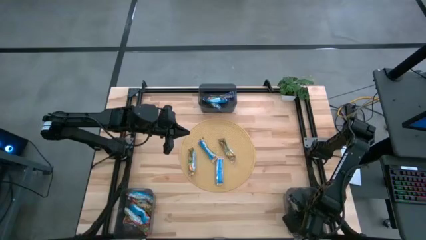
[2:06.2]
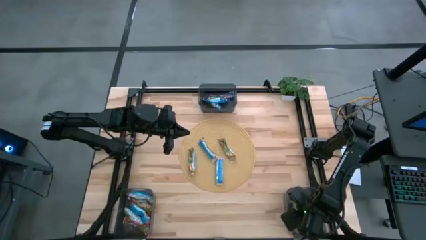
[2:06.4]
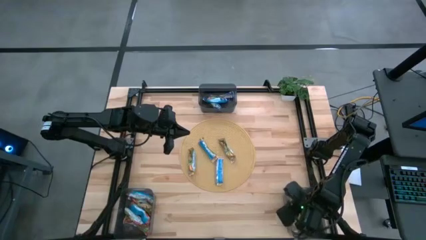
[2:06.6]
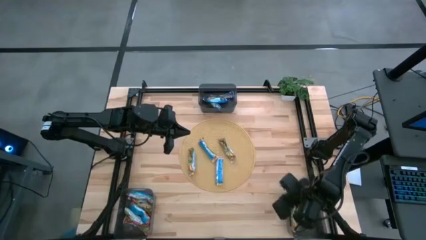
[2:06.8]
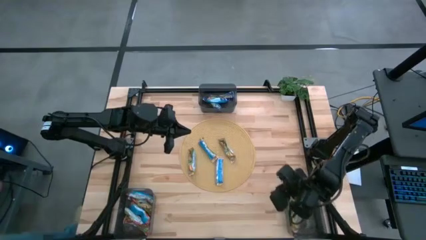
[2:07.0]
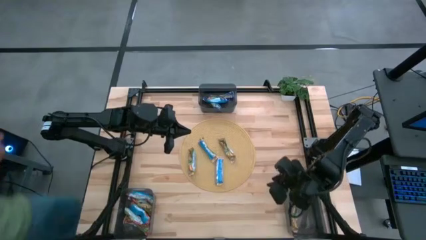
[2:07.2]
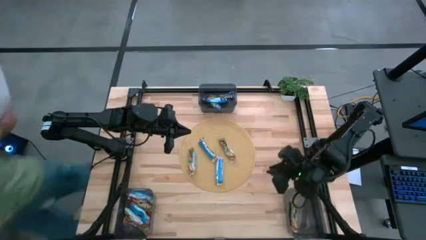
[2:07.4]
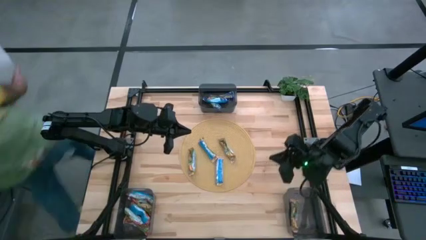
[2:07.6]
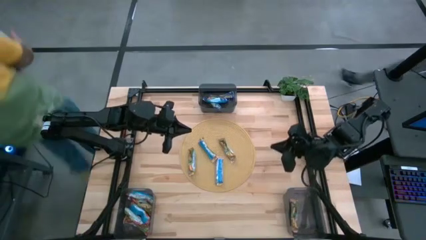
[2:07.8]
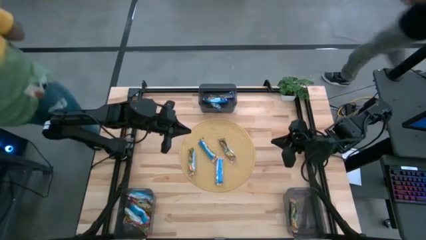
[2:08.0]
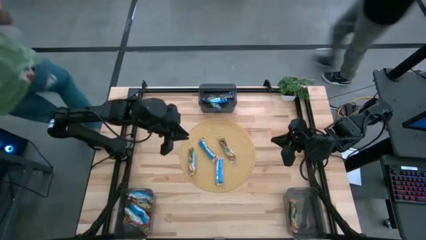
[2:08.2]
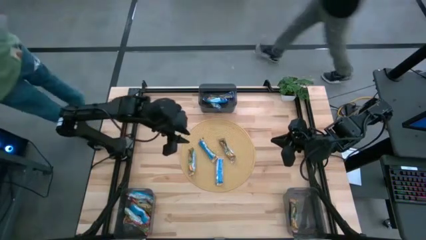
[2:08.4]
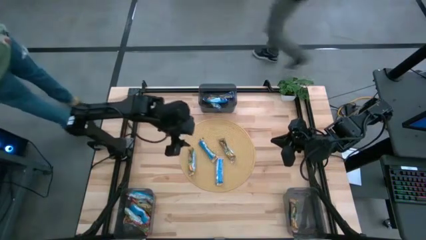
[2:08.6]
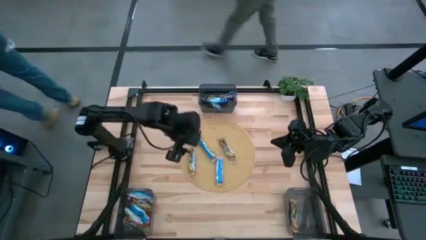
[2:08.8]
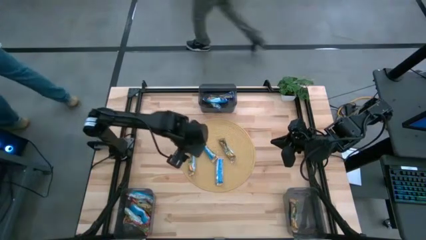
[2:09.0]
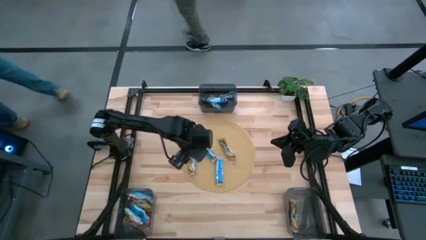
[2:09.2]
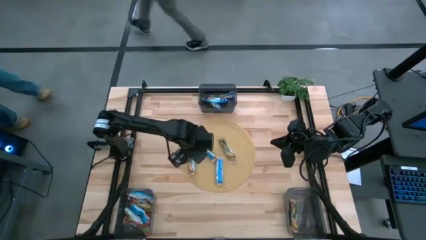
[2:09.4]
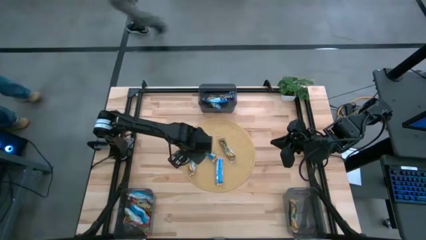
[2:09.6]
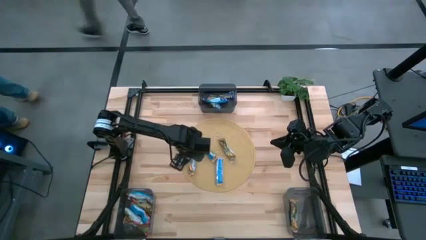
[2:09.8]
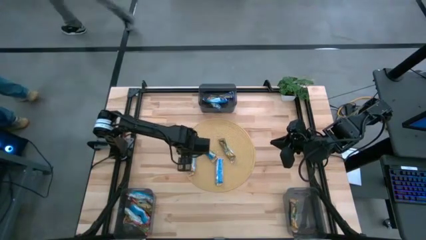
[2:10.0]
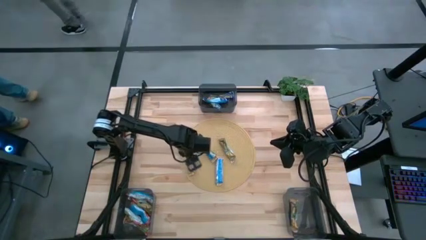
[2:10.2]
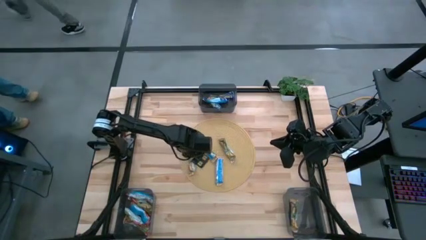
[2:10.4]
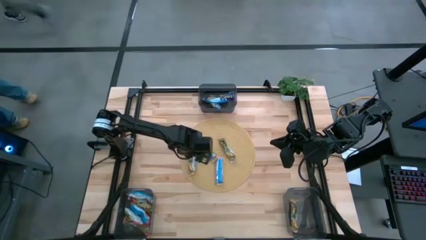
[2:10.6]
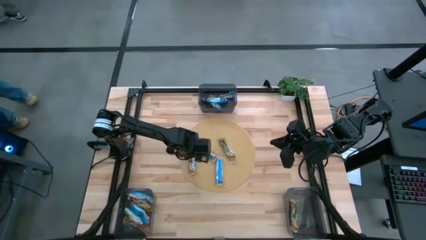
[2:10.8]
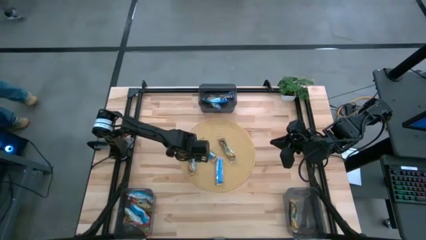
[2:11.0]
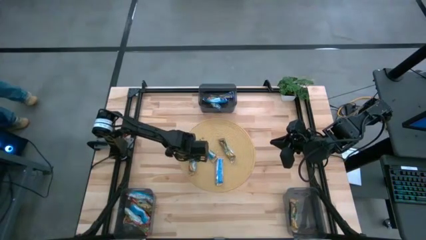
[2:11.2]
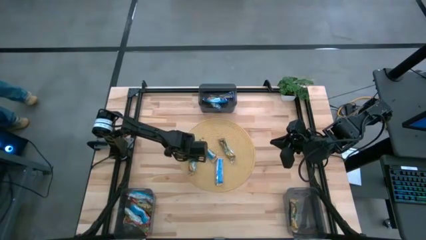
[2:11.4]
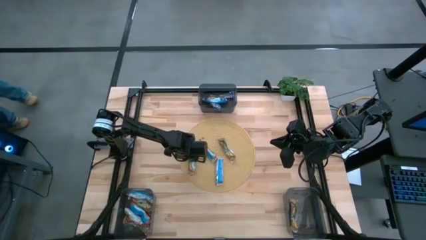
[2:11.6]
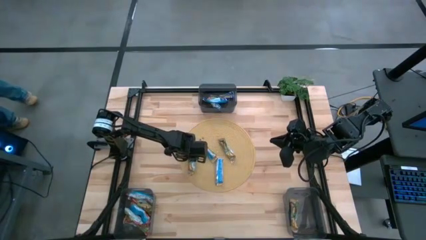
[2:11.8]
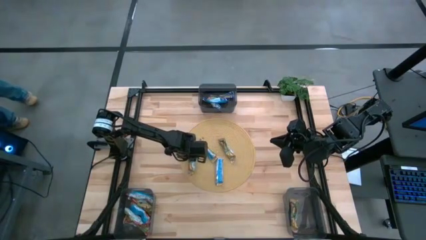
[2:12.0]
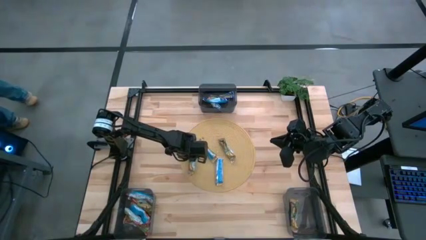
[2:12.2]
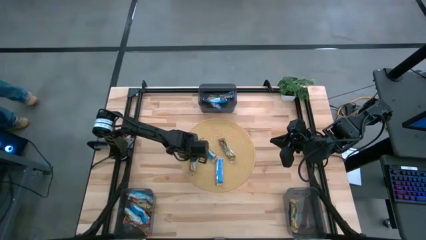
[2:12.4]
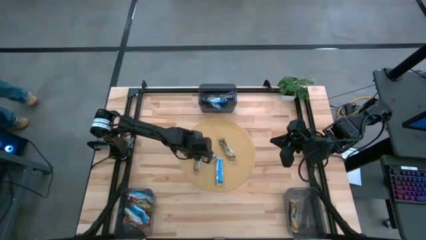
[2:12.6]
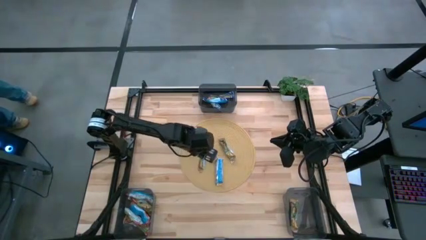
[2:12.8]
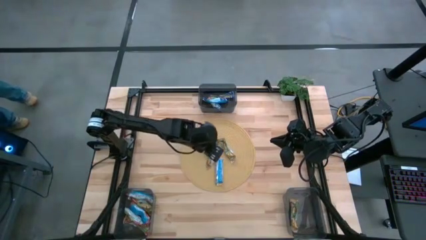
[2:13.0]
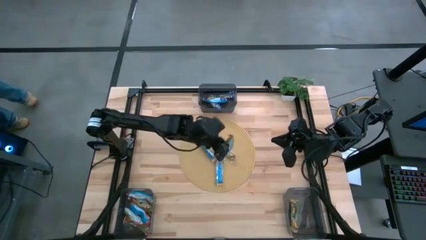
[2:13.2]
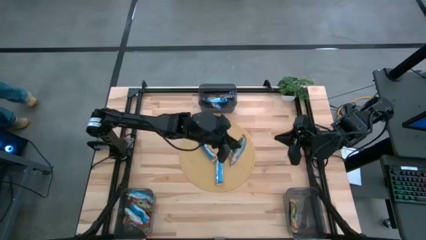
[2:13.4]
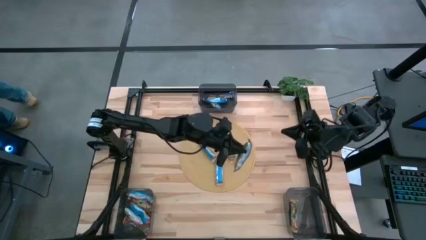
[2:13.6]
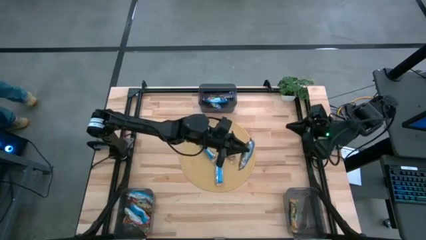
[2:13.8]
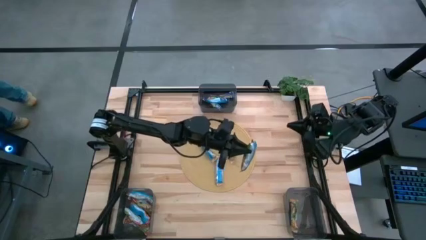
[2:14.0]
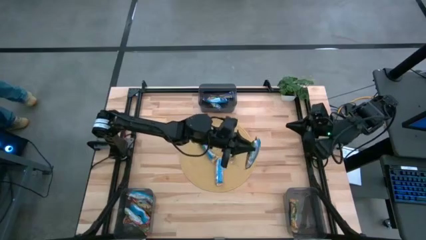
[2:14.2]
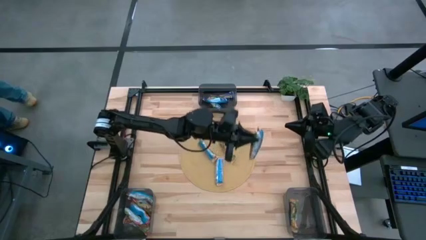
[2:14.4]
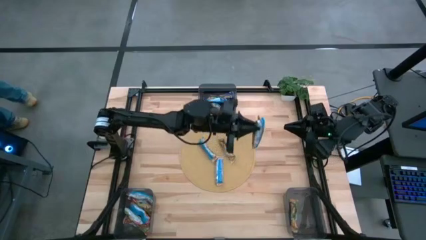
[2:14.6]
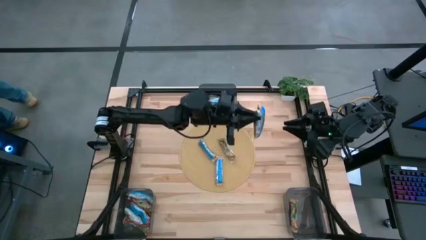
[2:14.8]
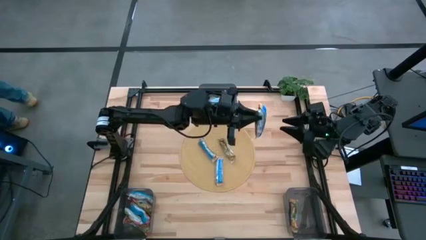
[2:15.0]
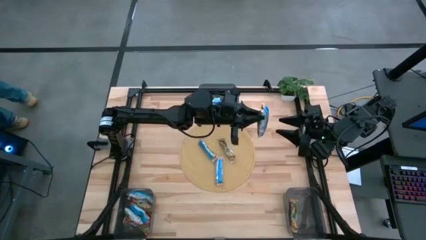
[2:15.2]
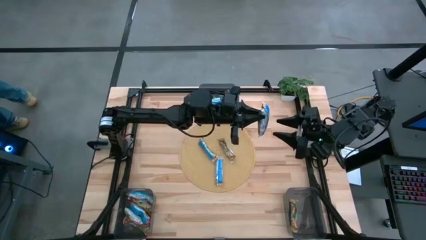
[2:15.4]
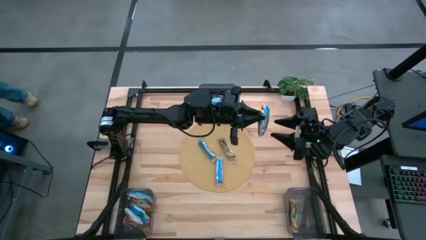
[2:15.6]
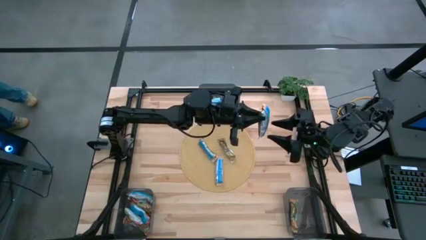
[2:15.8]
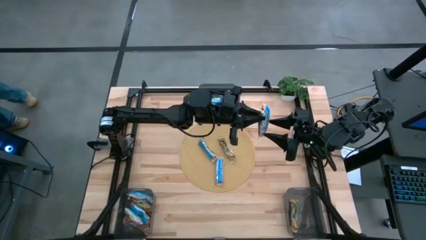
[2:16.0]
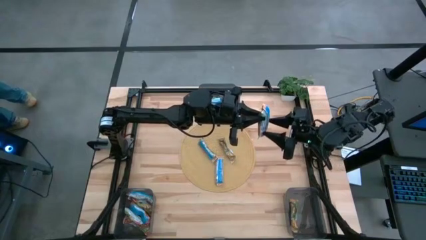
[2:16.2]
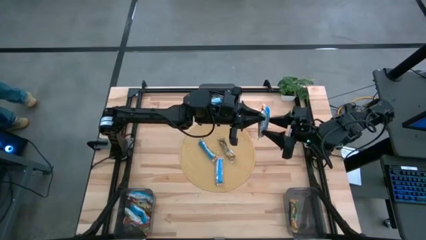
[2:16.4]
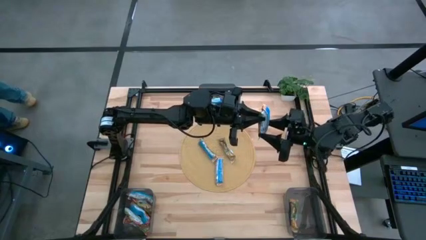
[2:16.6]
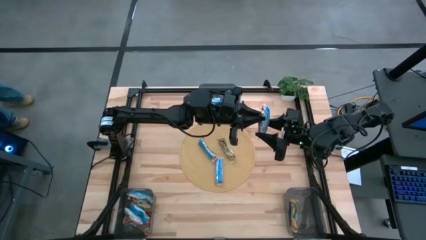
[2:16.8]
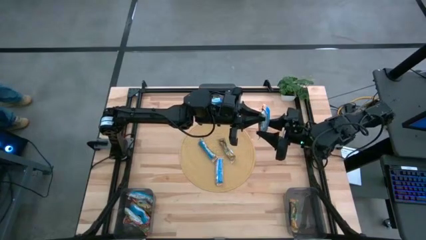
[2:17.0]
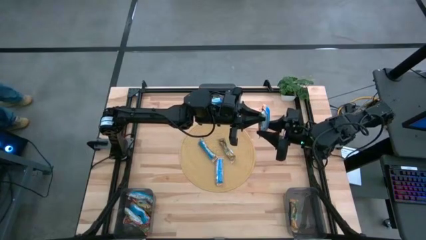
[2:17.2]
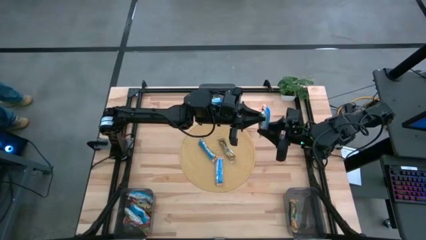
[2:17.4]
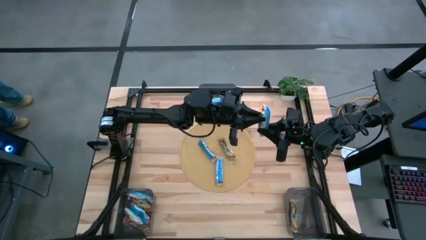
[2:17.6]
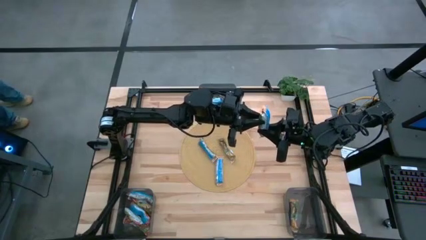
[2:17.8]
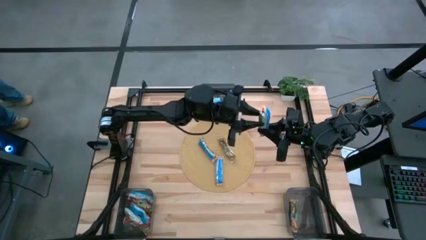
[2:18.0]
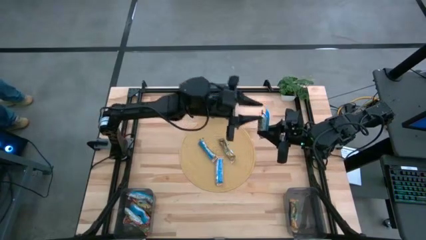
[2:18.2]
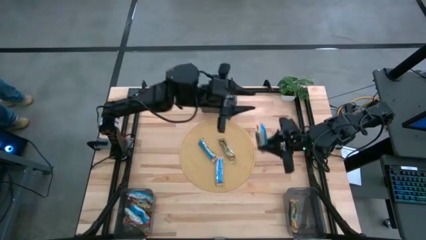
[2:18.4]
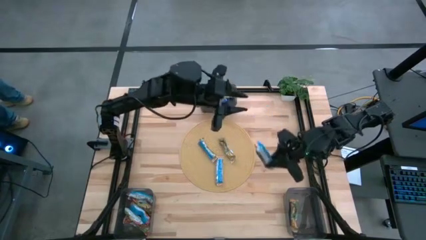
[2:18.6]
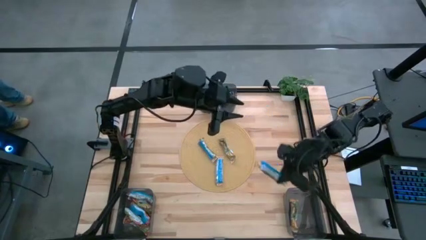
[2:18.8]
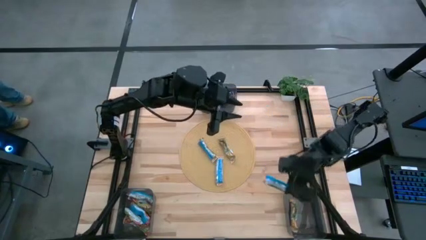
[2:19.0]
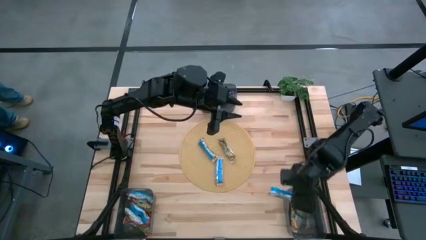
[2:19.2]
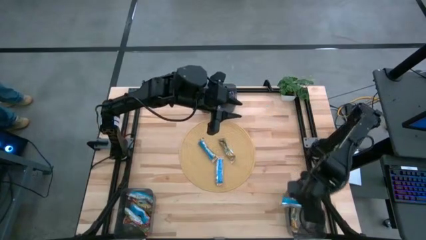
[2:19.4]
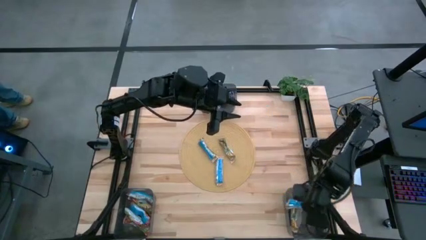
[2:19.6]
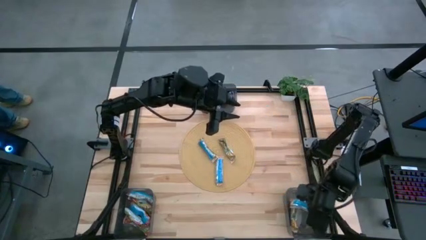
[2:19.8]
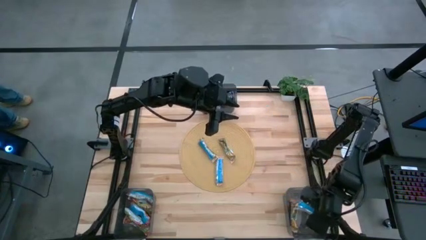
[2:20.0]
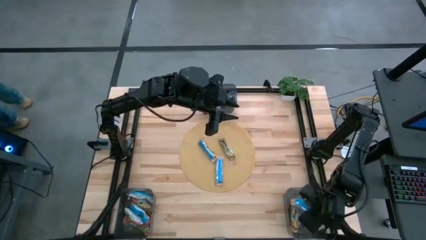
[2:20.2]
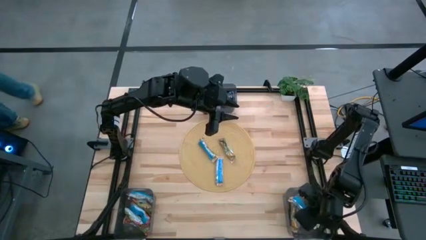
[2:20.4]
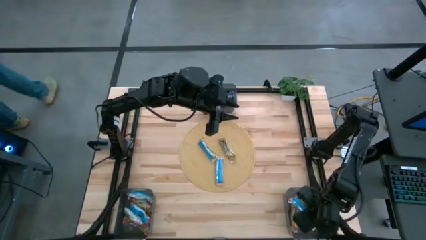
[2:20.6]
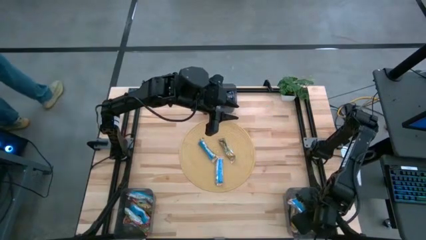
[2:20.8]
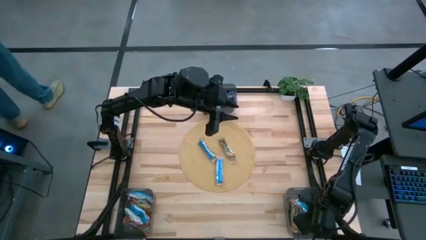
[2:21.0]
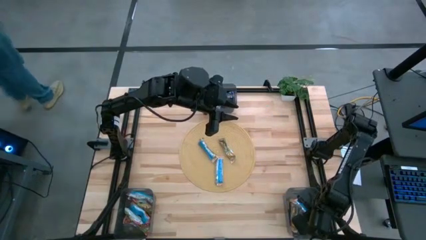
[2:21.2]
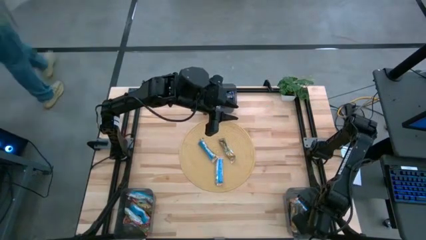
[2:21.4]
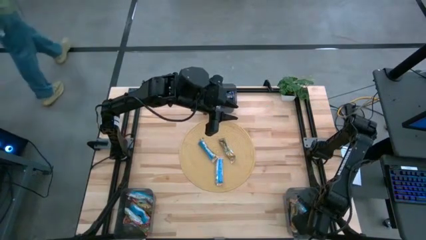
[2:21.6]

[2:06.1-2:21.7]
Task: Pick and place Granola Bars by type
Put the yellow granola bar into the right black bin

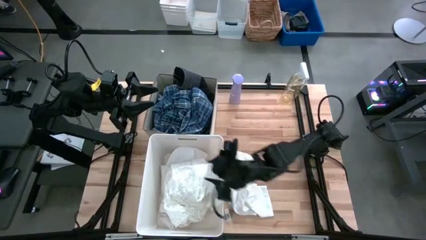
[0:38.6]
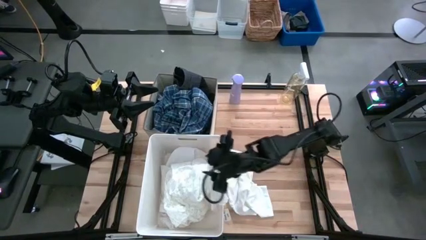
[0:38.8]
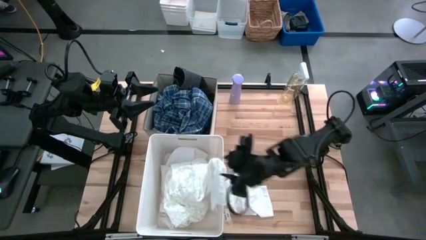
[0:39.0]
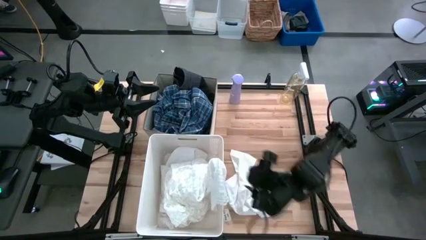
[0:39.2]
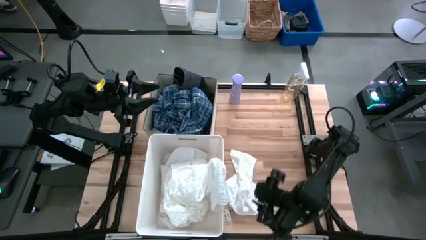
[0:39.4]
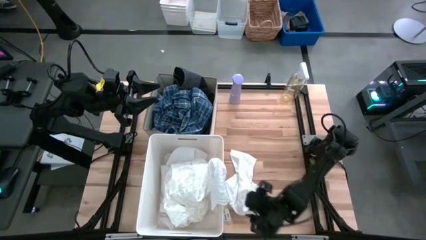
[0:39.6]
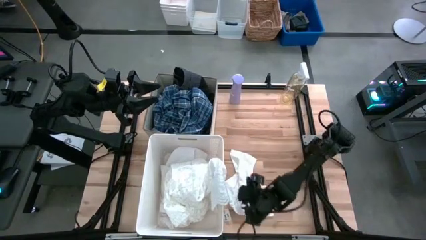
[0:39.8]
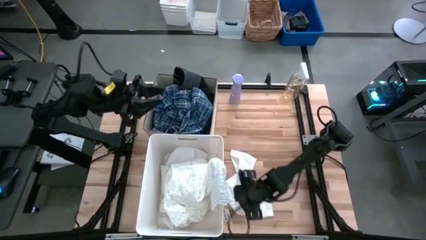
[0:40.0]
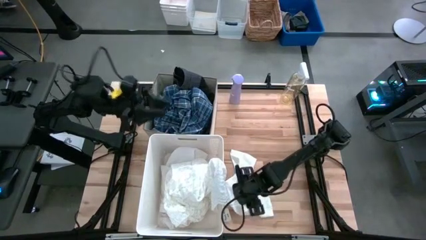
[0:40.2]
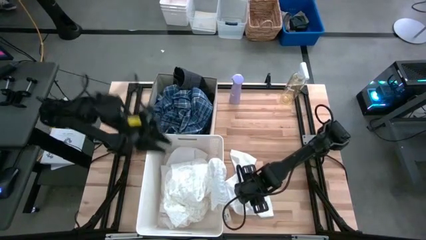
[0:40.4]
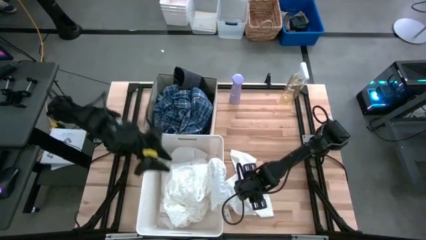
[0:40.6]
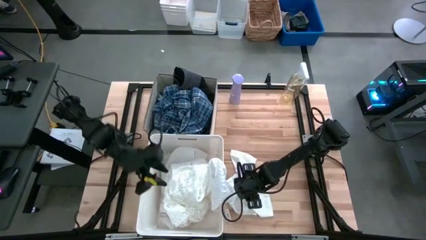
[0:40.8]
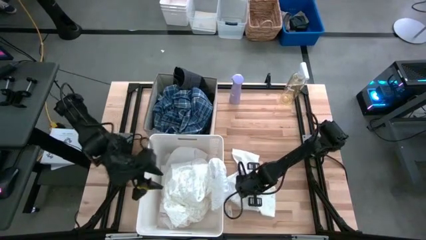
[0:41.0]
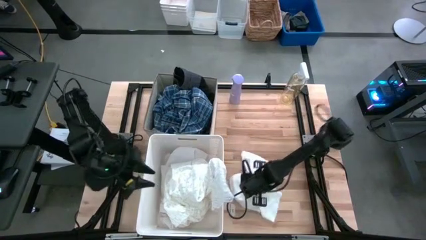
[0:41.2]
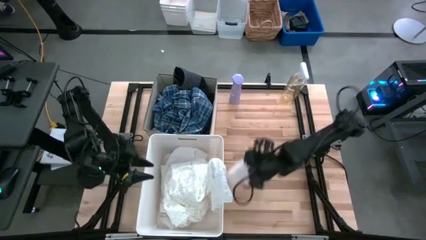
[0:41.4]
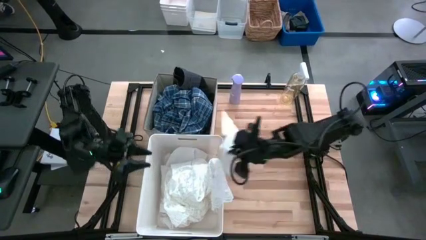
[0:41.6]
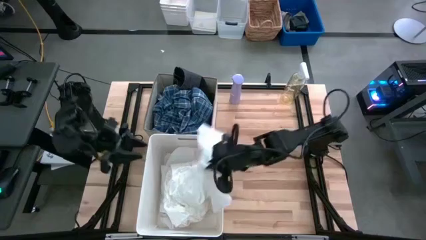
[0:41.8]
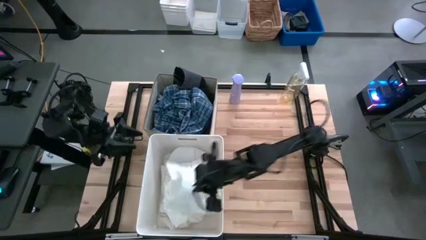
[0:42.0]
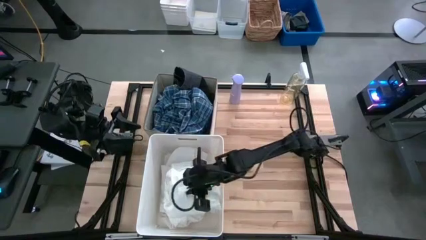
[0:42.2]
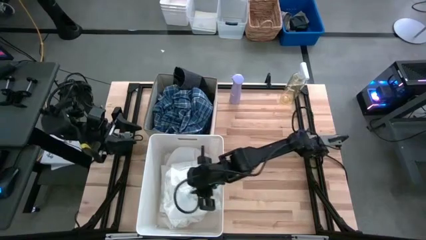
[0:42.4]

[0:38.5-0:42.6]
Task: Sort clothes
Put the white underwear into the bottom white laundry organizer
